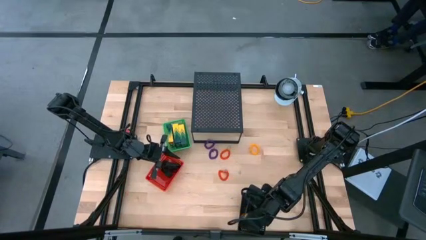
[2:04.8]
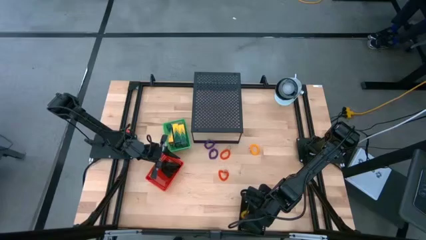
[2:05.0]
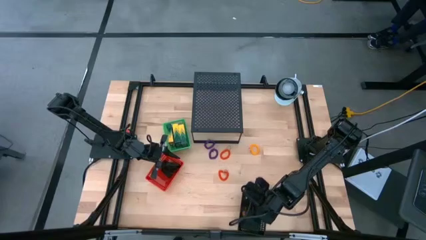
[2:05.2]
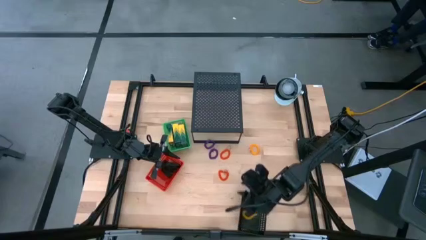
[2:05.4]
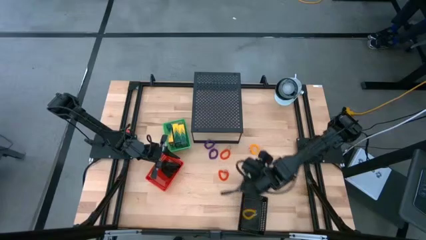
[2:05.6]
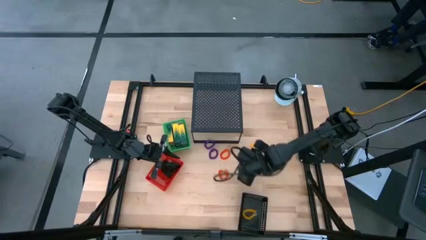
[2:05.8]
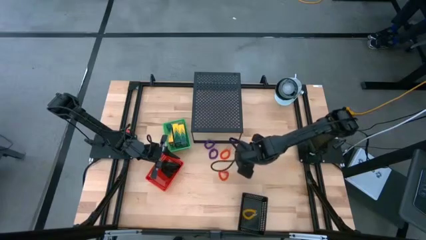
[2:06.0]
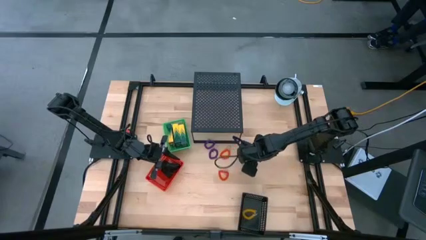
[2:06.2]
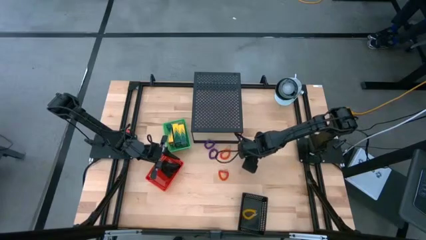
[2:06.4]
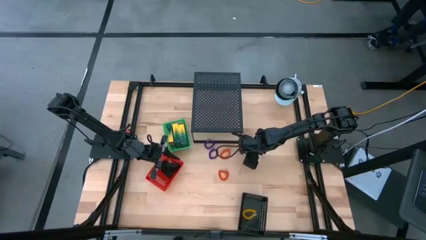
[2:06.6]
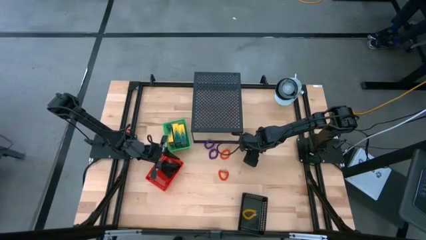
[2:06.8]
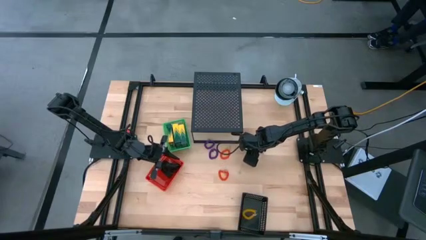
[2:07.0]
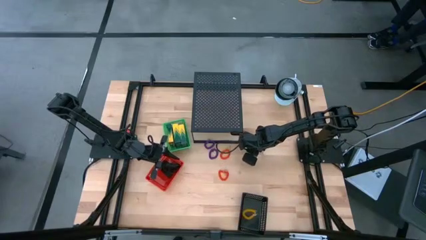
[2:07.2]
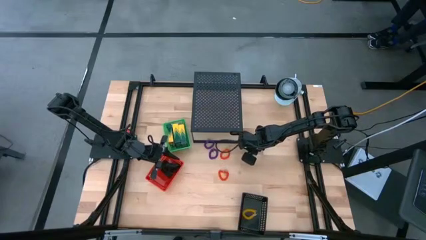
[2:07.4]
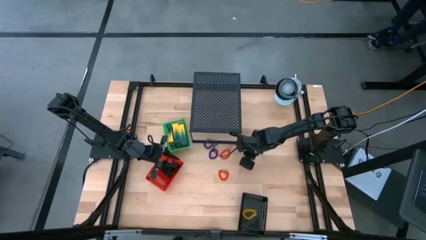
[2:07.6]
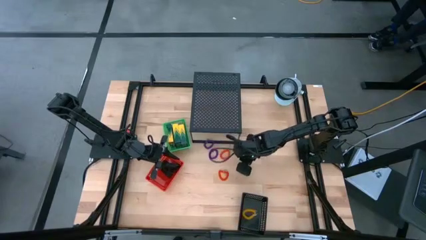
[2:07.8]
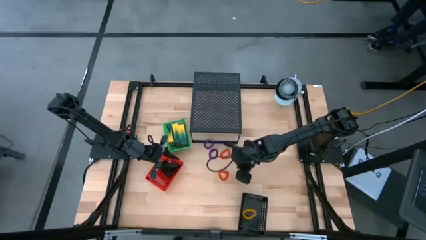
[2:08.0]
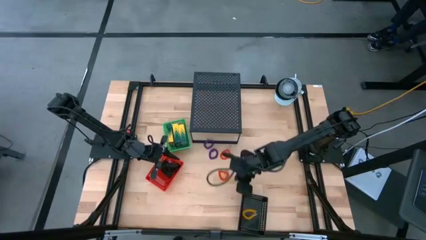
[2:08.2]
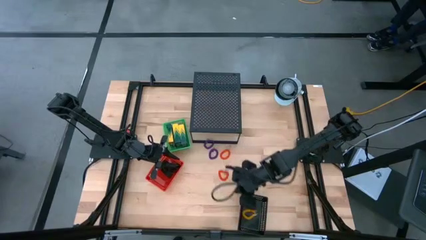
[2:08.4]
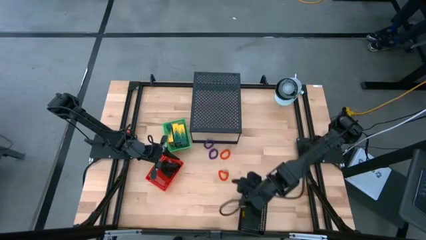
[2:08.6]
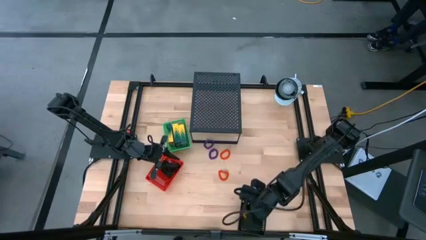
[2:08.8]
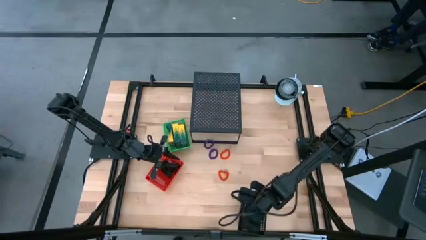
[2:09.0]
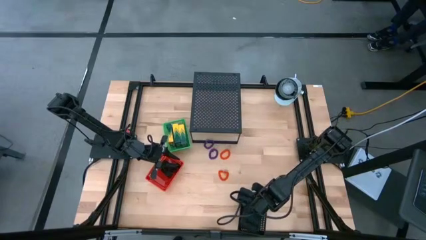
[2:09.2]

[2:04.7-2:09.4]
Task: Pick & Place Office Desk Supplies
Put the yellow spring keychain into the black bin

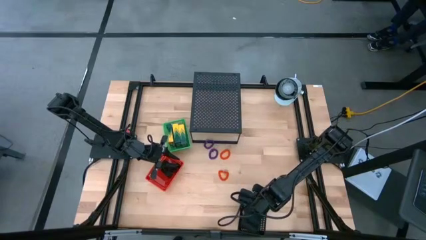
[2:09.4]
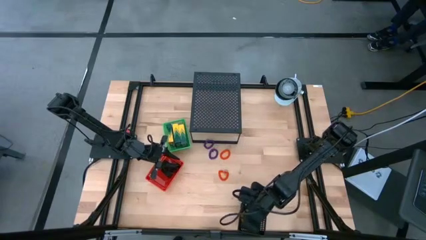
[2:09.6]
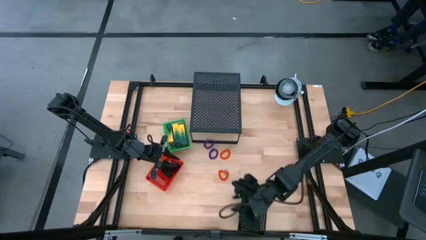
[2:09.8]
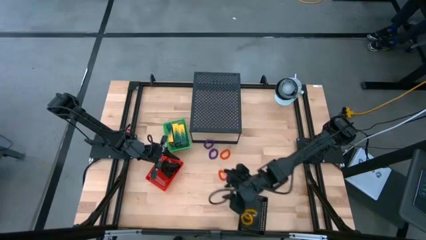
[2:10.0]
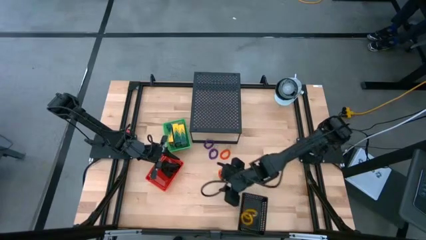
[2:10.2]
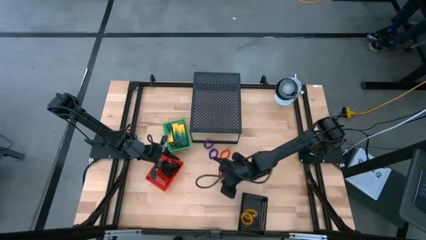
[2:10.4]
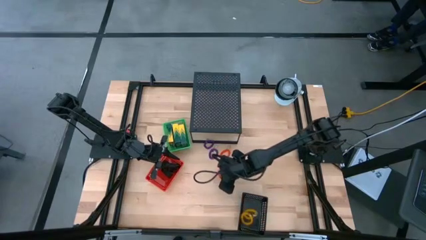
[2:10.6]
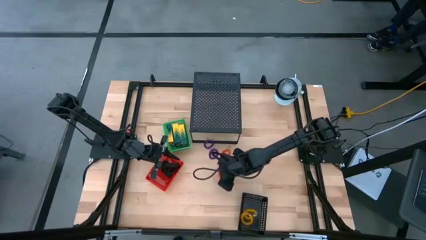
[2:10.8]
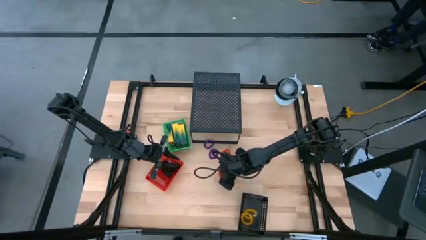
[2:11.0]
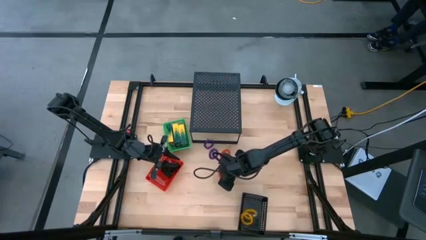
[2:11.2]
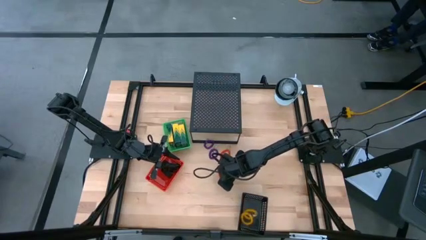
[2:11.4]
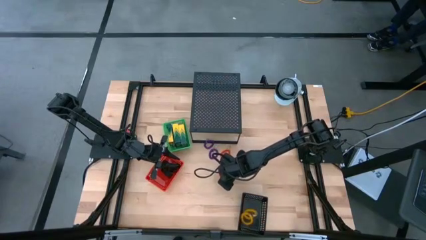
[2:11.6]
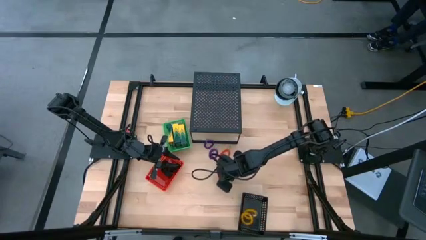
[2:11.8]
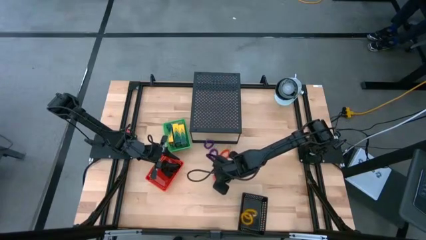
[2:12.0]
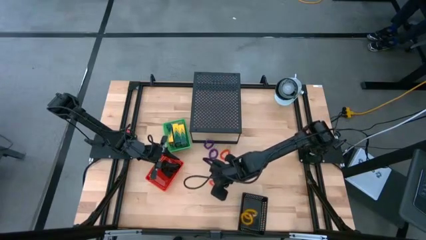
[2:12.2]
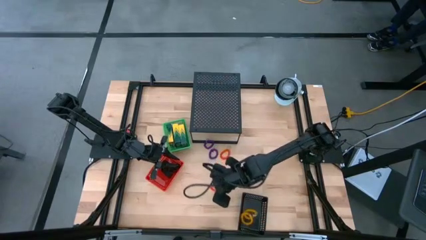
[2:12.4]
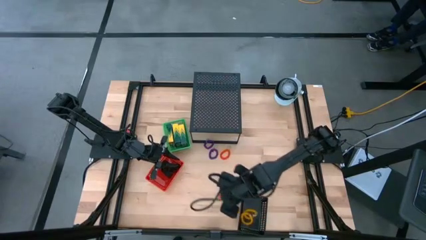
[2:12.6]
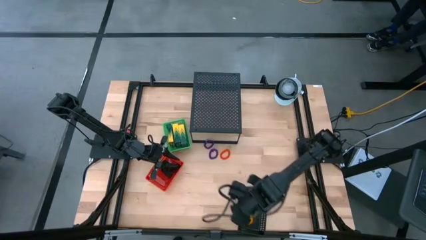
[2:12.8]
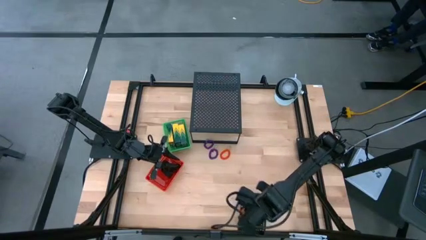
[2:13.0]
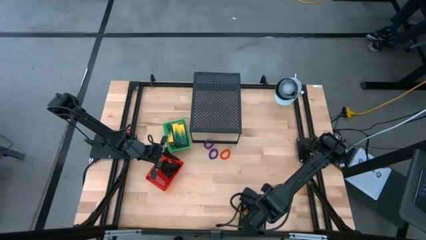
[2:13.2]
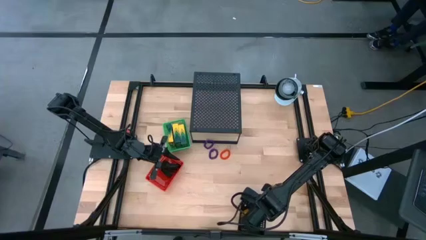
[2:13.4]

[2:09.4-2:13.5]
Put the orange spring keychain into the black bin

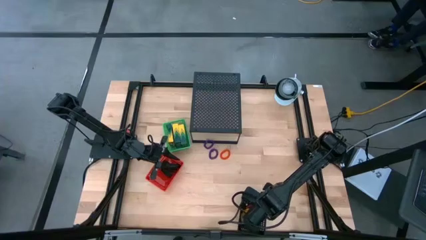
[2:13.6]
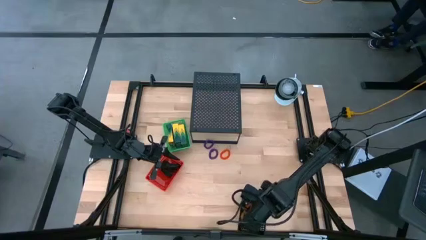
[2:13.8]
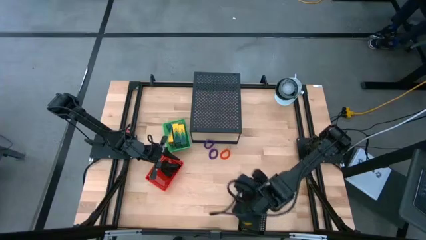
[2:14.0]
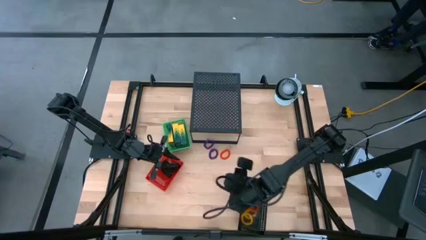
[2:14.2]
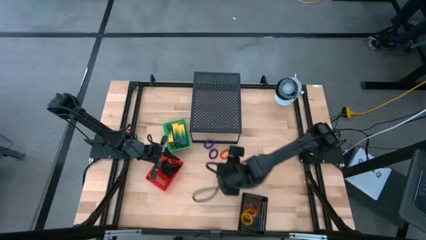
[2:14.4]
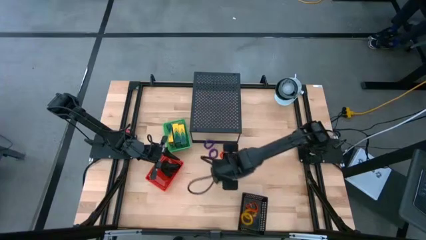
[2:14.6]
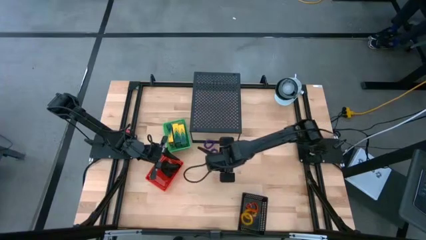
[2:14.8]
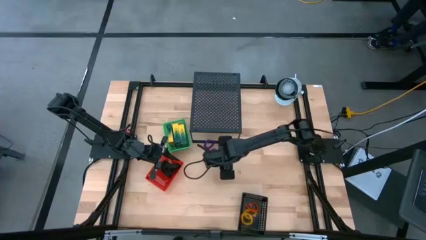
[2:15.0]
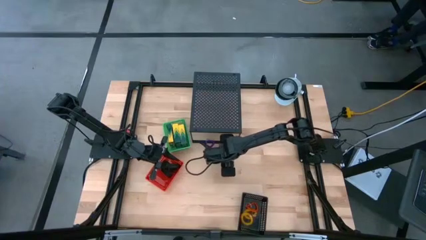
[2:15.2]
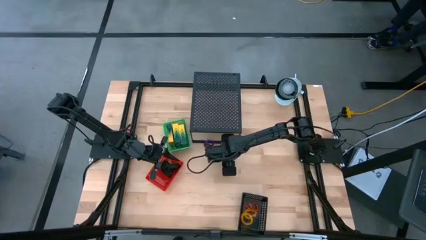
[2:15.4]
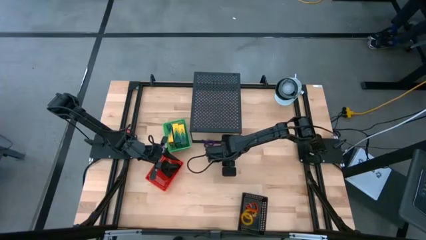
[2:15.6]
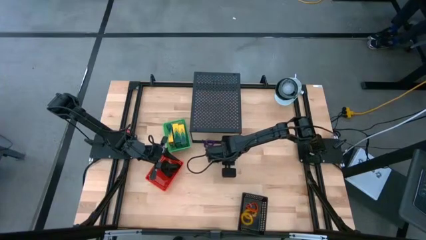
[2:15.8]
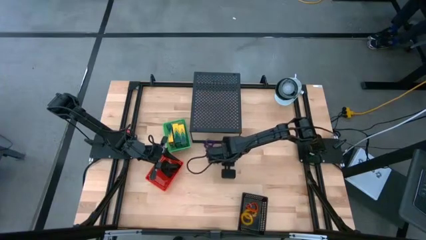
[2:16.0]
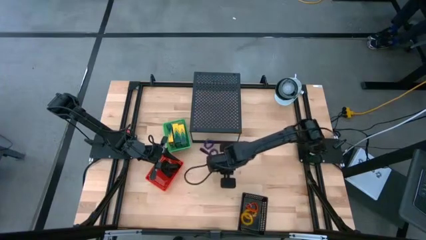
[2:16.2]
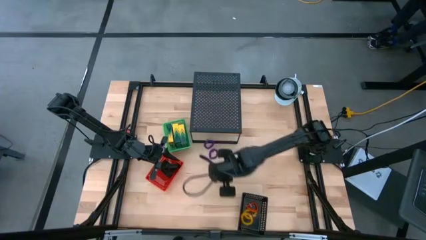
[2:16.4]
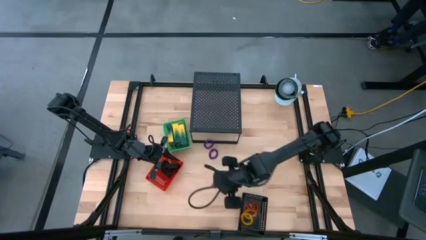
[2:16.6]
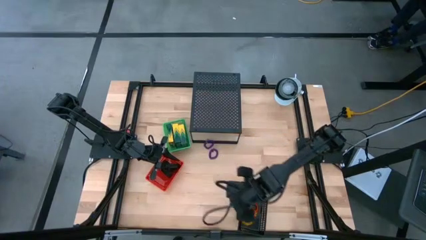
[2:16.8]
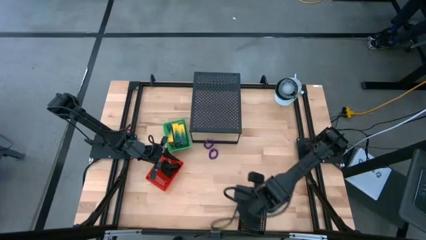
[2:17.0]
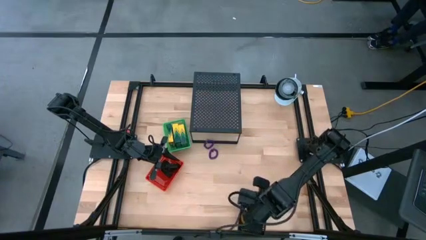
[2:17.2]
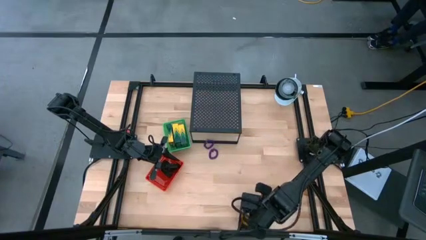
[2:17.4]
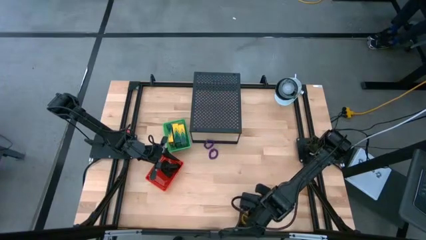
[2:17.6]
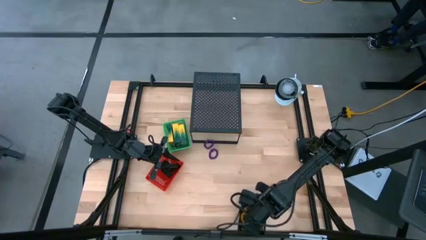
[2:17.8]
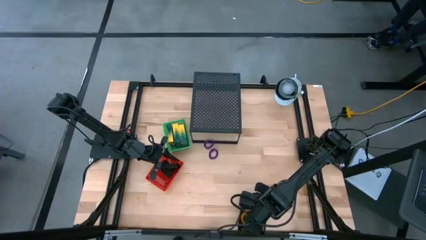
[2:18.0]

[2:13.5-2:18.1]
Put the orange spring keychain into the black bin

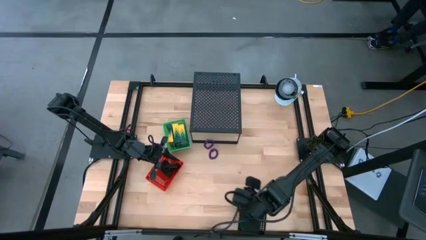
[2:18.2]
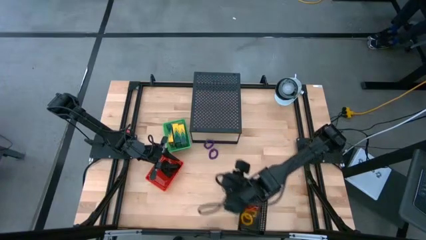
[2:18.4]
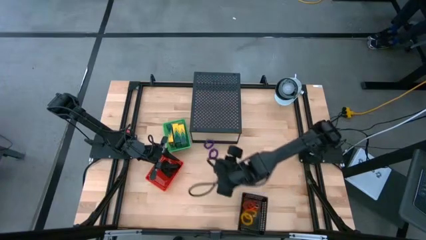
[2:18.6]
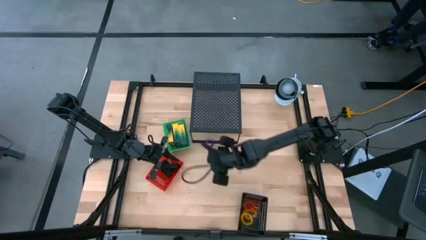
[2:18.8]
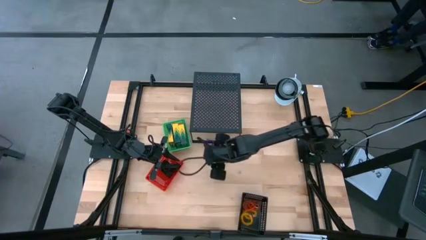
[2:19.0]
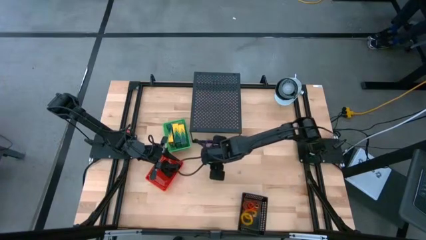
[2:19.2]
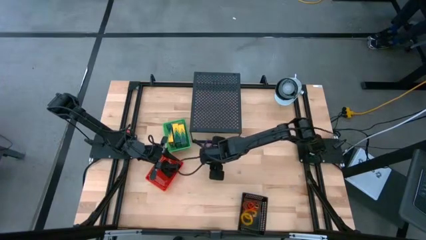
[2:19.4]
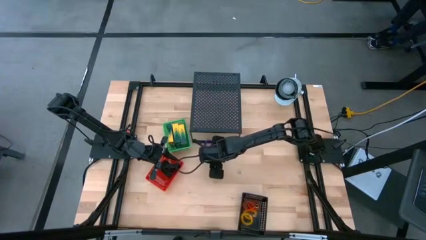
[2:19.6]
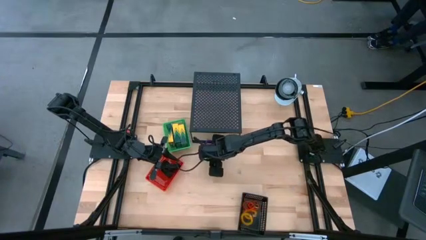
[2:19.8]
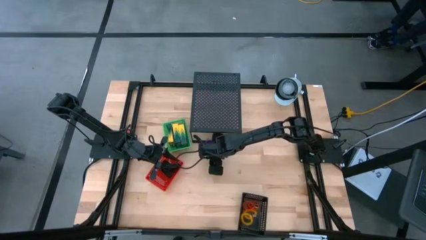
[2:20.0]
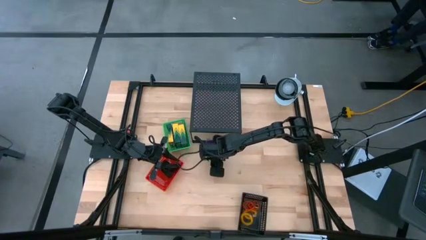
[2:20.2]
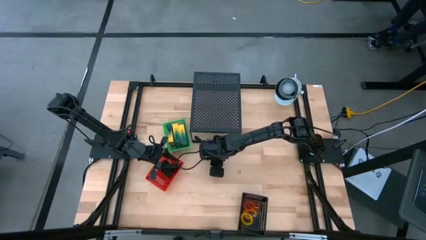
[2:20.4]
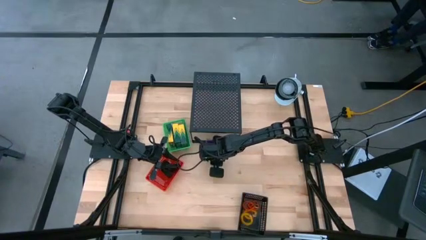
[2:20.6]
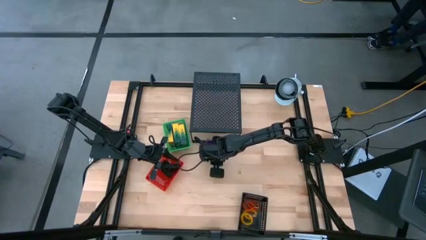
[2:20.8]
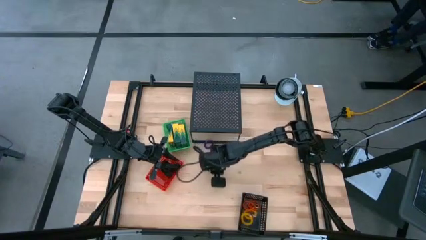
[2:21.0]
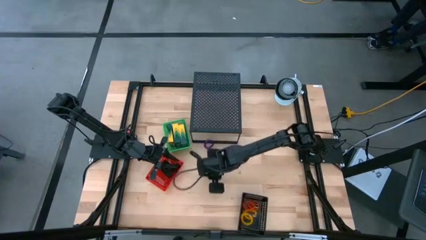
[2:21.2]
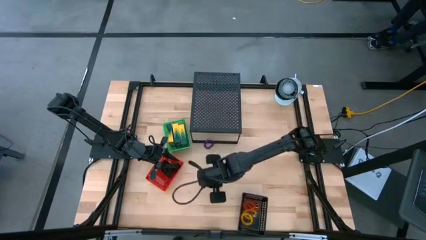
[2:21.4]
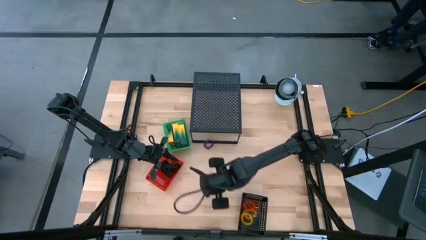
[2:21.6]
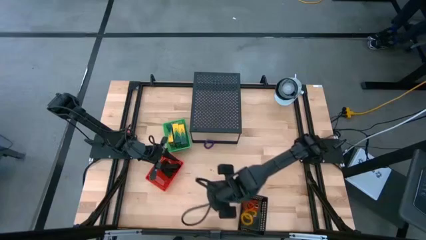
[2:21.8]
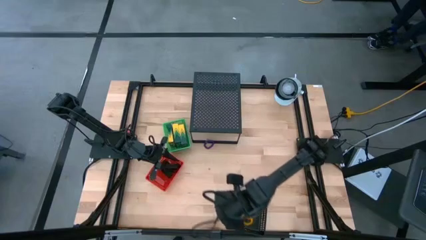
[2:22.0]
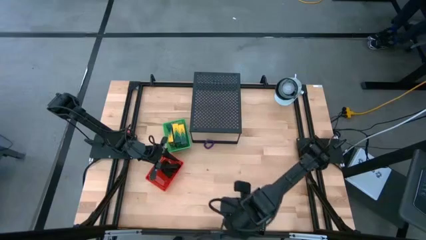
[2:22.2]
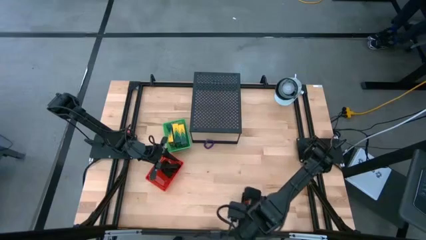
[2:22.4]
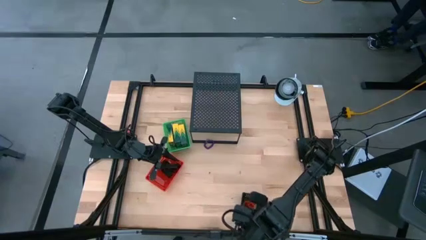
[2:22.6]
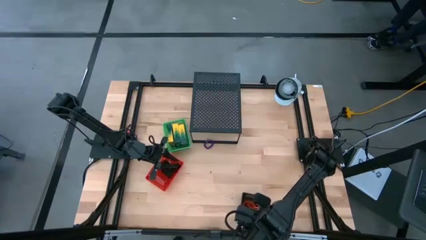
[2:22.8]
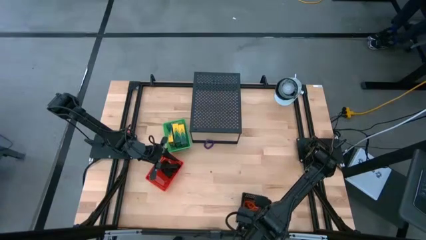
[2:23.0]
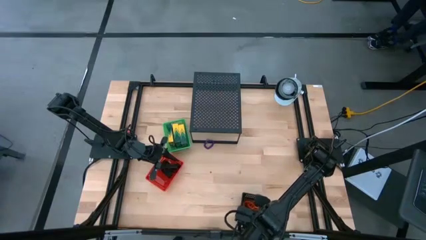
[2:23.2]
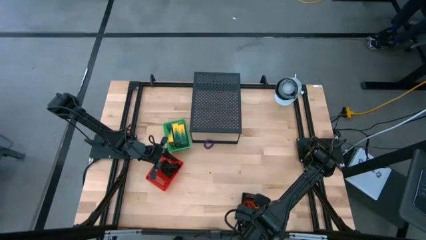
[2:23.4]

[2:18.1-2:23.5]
Put the purple spring keychain into the black bin
